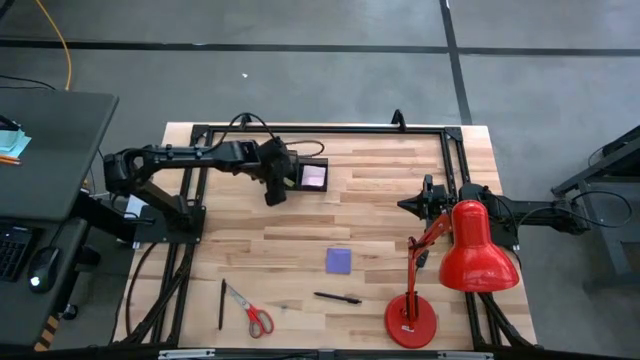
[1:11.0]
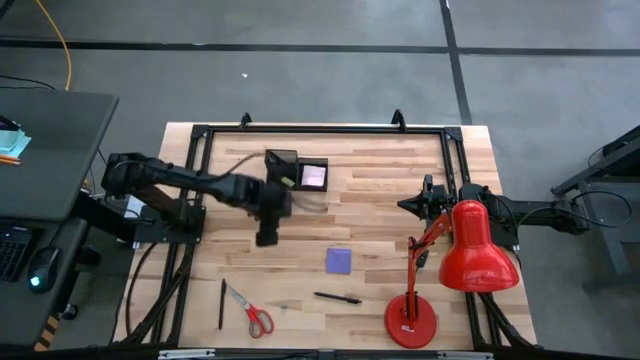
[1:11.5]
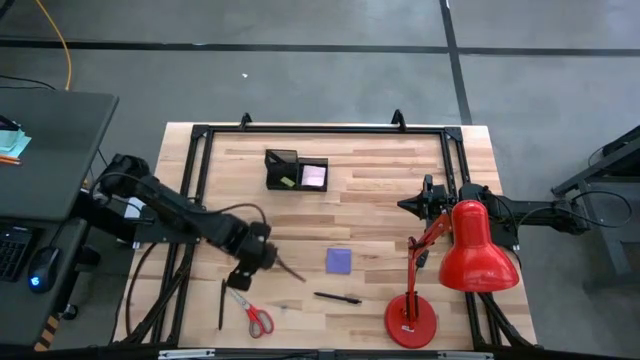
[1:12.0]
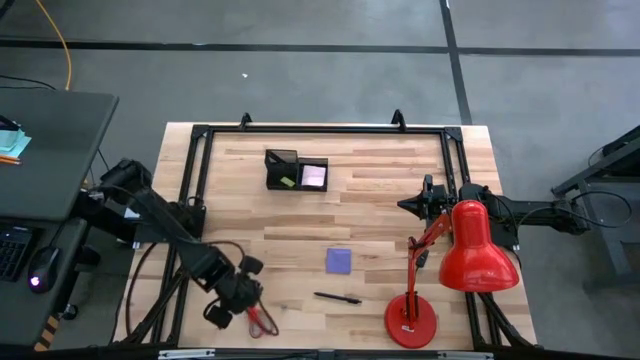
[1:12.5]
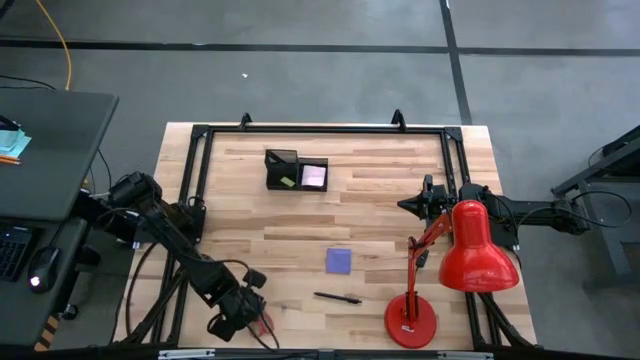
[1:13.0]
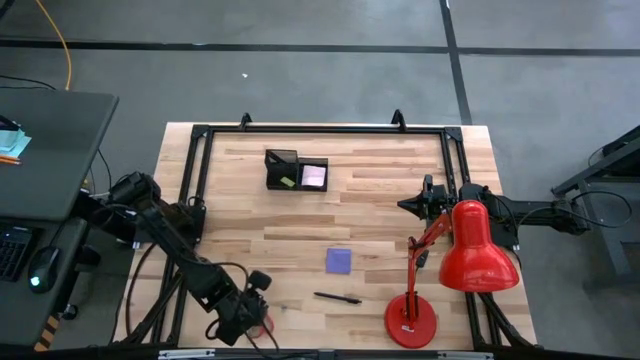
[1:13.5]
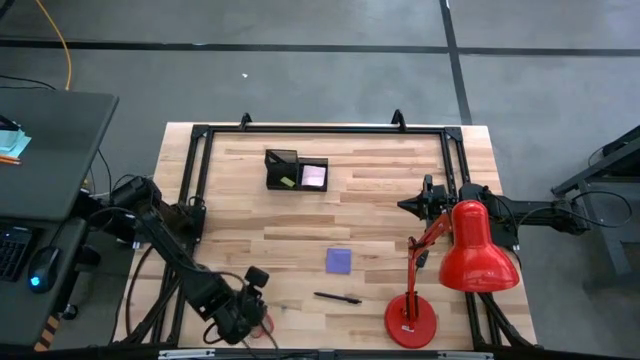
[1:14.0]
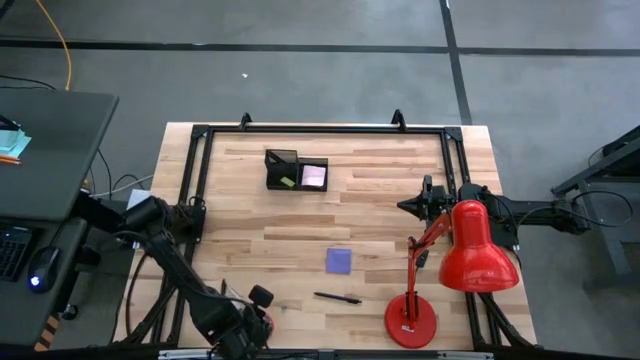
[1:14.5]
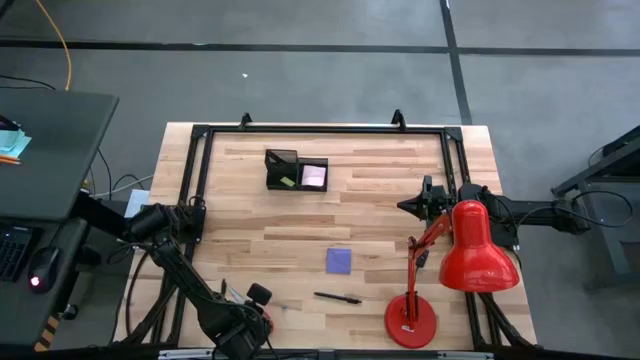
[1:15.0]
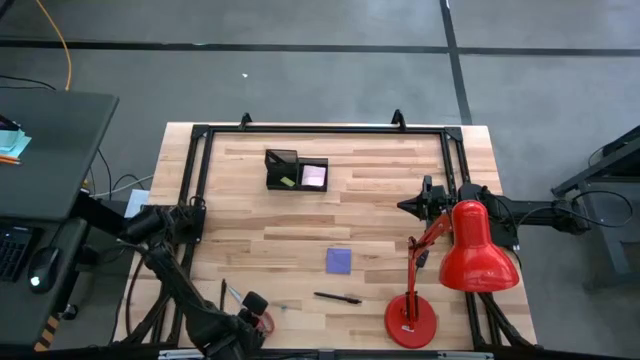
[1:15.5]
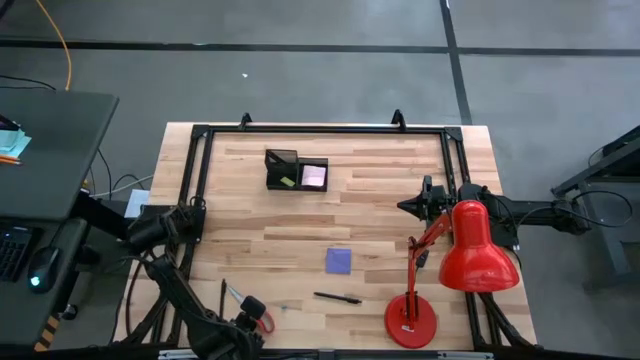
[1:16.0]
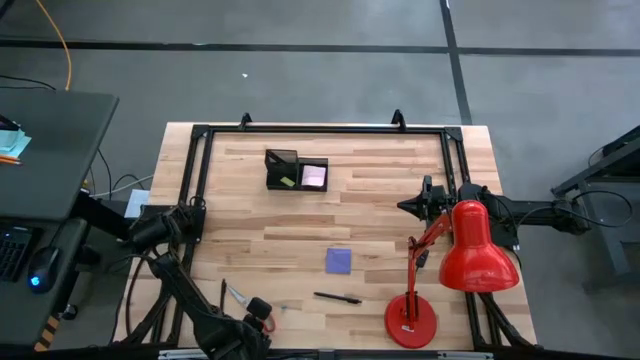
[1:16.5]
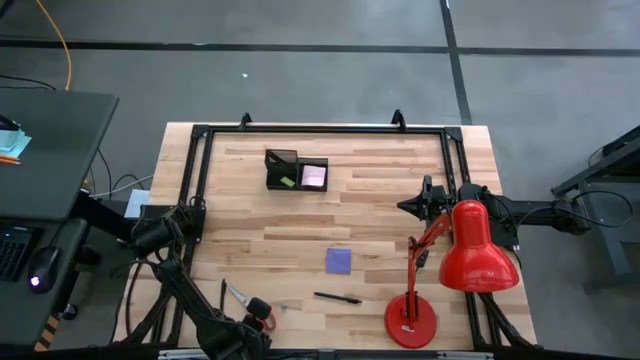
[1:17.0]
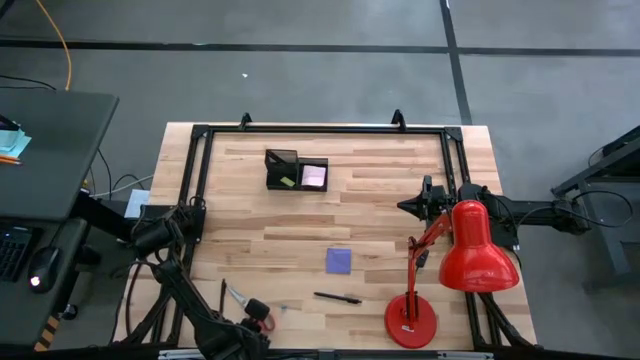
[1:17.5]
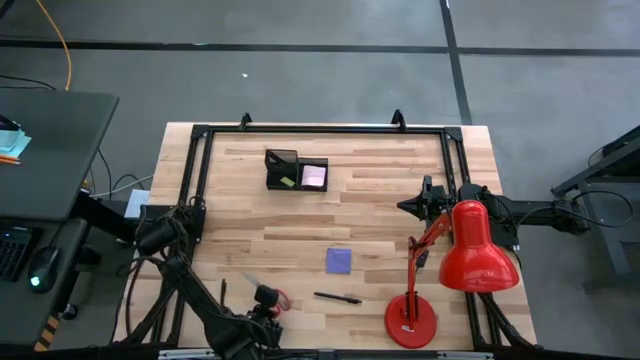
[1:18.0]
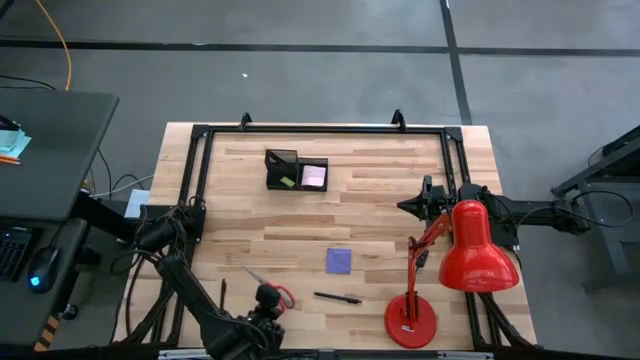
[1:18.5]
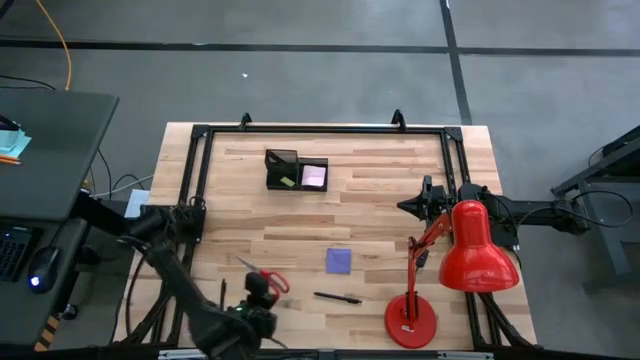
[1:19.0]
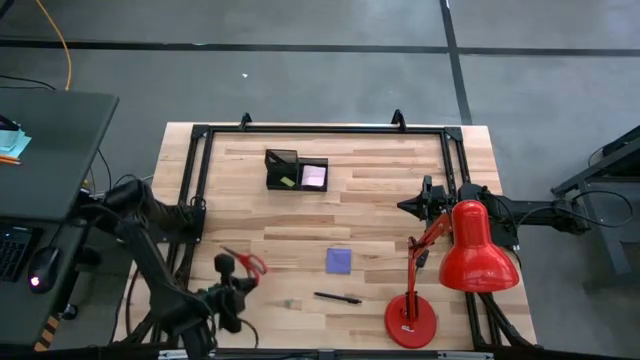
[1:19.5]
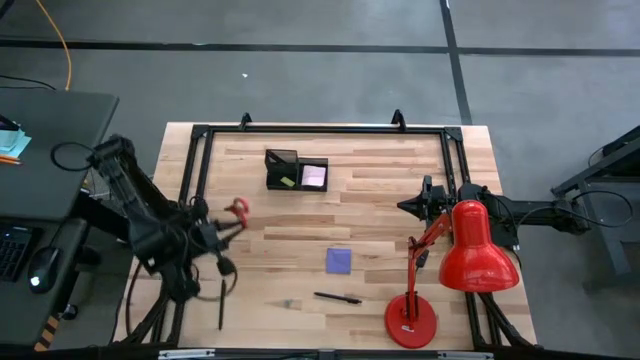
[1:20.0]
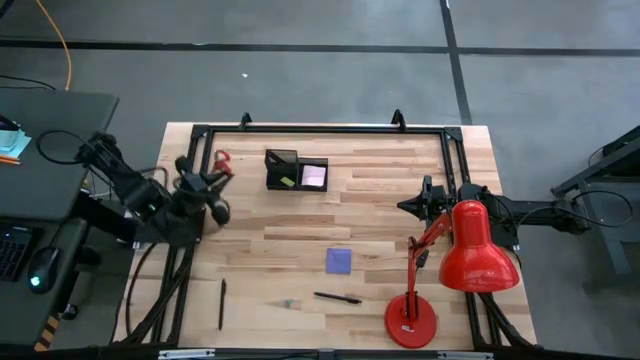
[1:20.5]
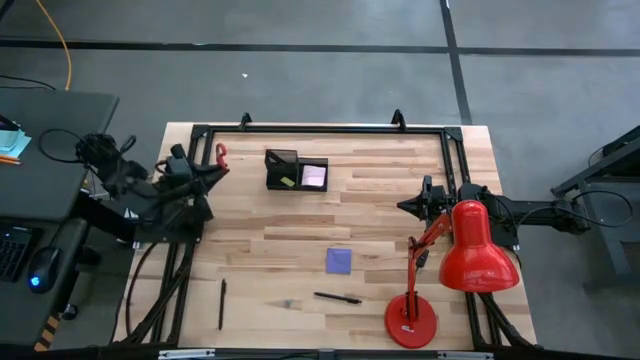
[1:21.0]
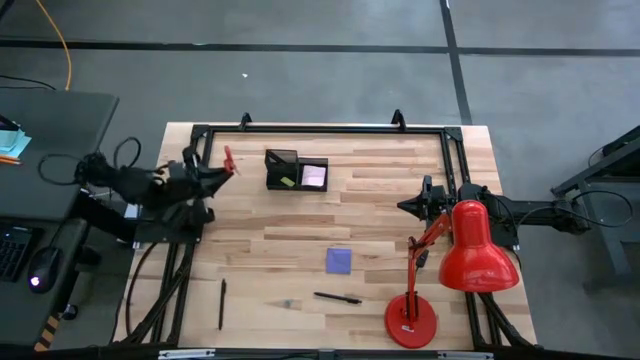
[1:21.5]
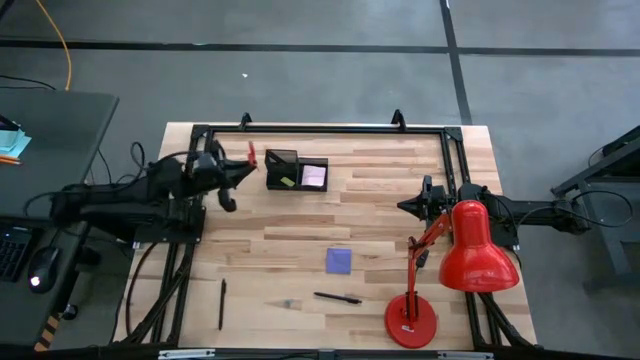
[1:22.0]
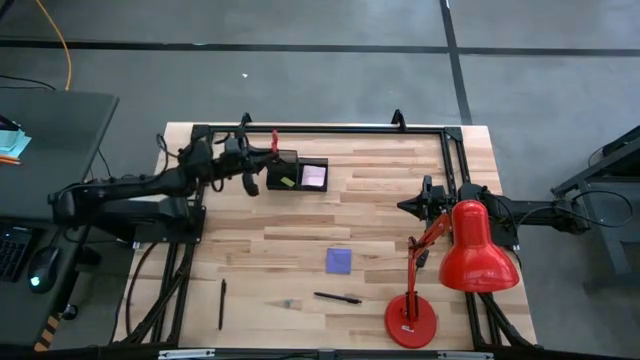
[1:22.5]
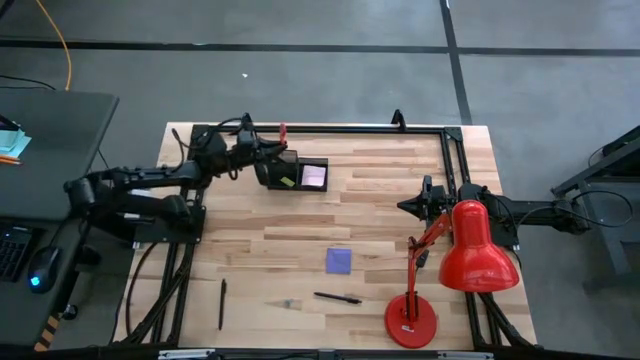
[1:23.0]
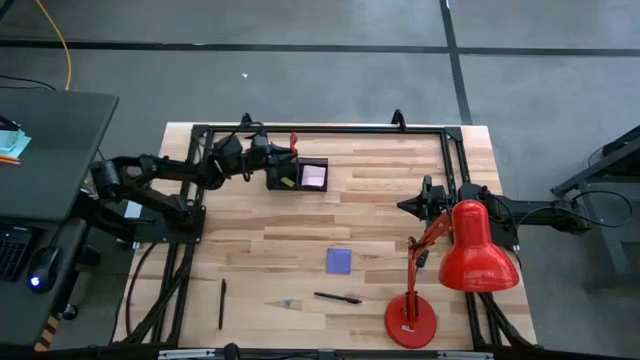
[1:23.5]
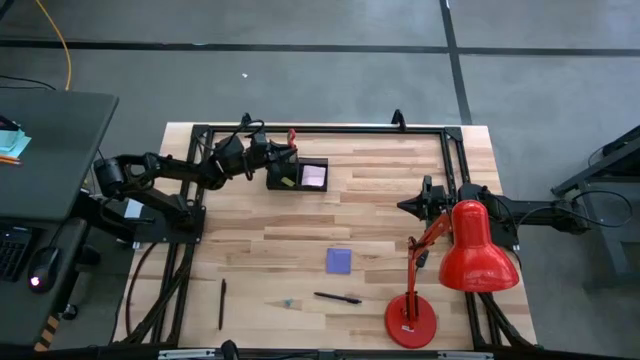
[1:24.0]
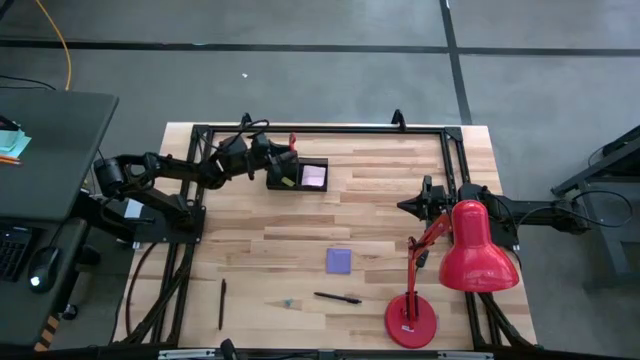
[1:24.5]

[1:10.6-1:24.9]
Task: Pick and place office supplies into organizer
Put the red scissors into the black desk organizer

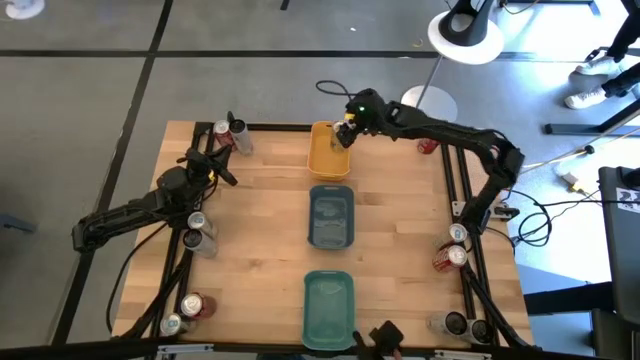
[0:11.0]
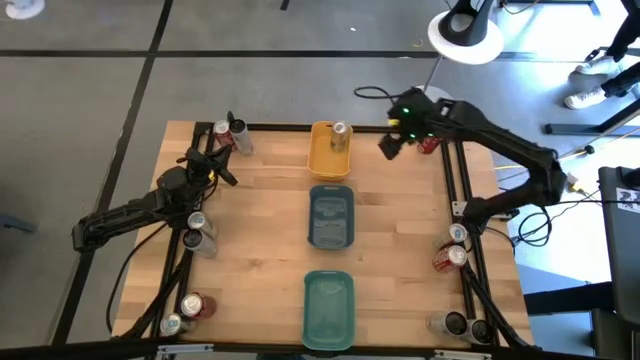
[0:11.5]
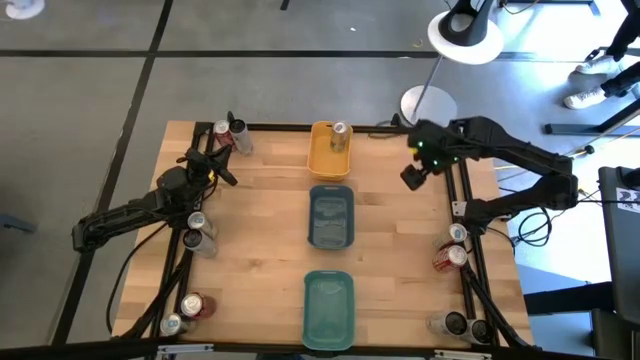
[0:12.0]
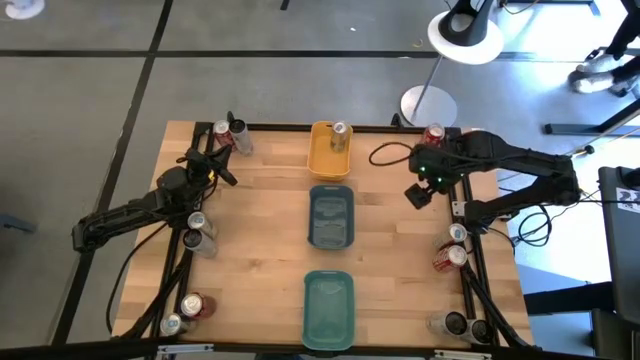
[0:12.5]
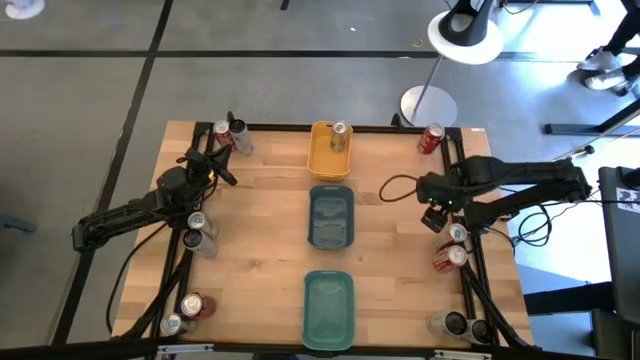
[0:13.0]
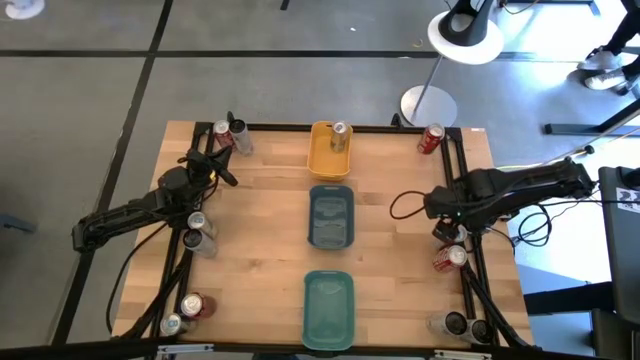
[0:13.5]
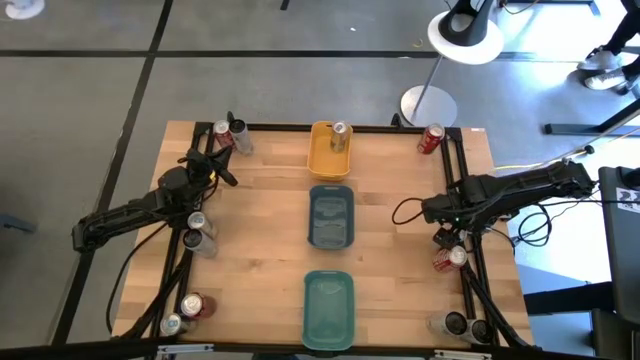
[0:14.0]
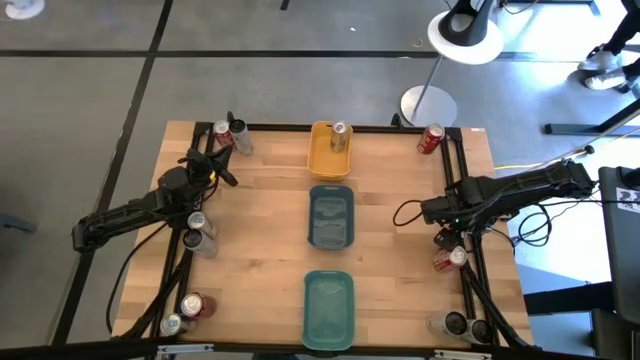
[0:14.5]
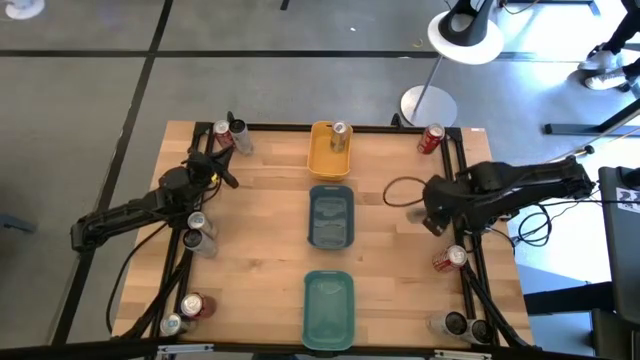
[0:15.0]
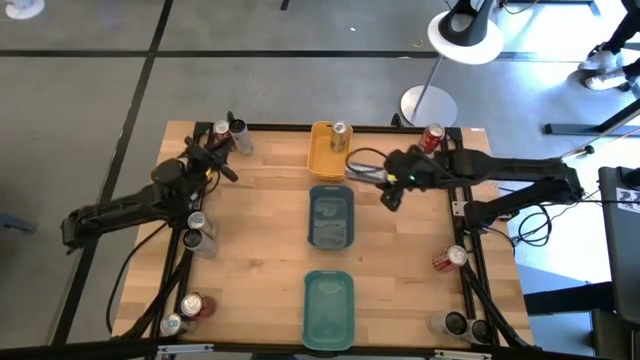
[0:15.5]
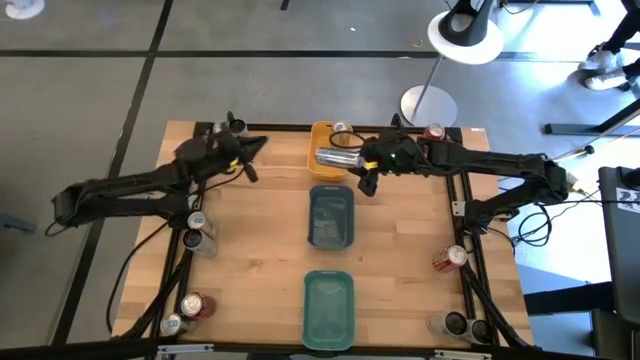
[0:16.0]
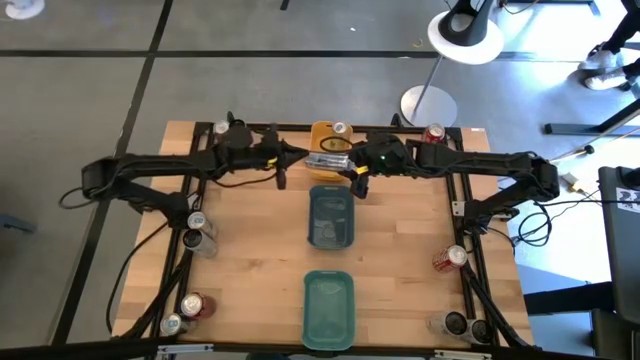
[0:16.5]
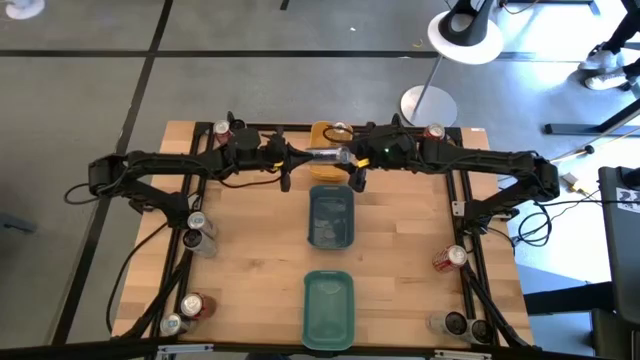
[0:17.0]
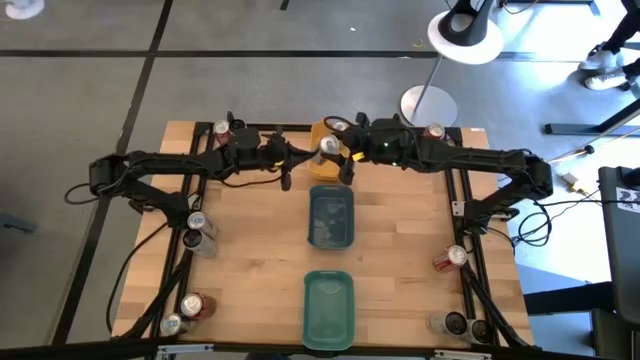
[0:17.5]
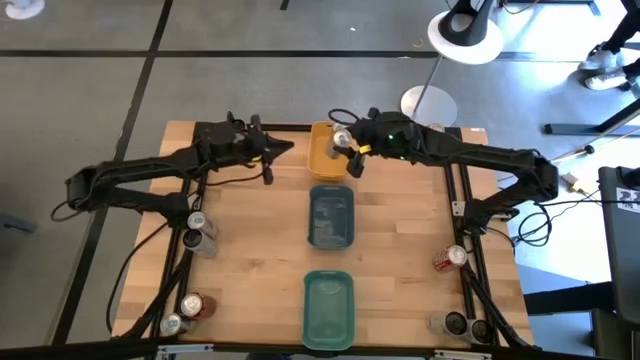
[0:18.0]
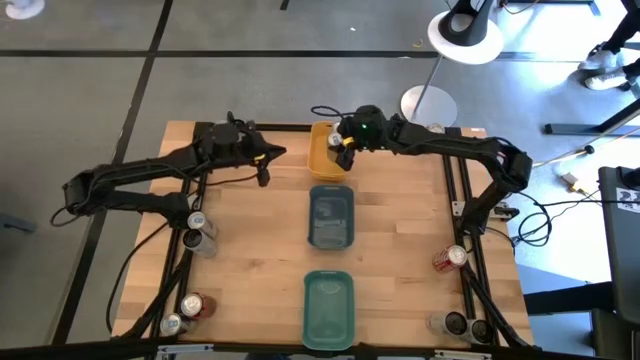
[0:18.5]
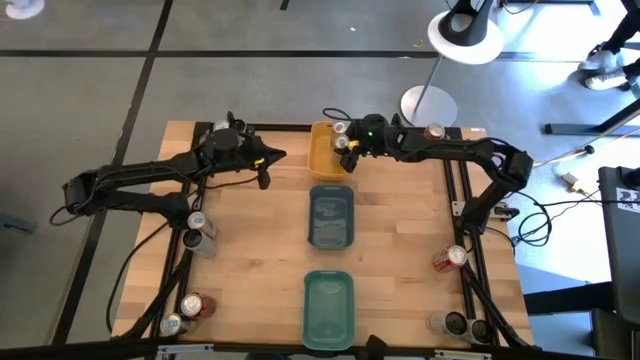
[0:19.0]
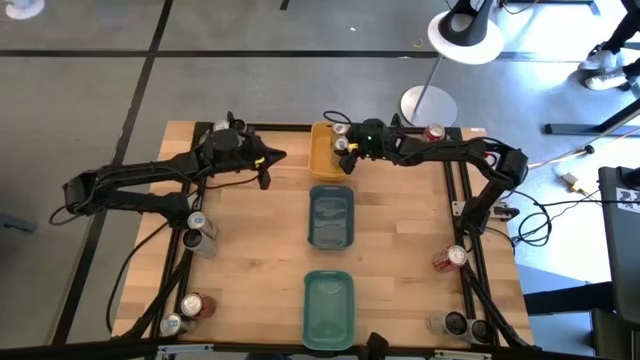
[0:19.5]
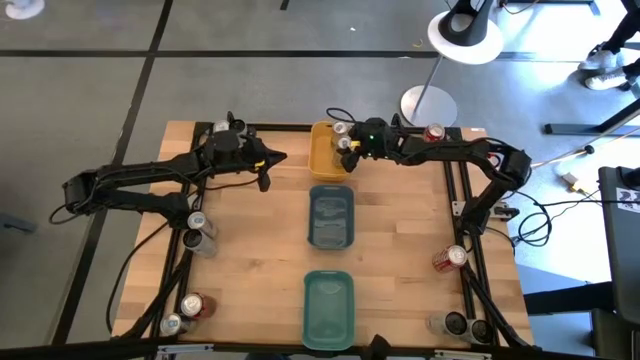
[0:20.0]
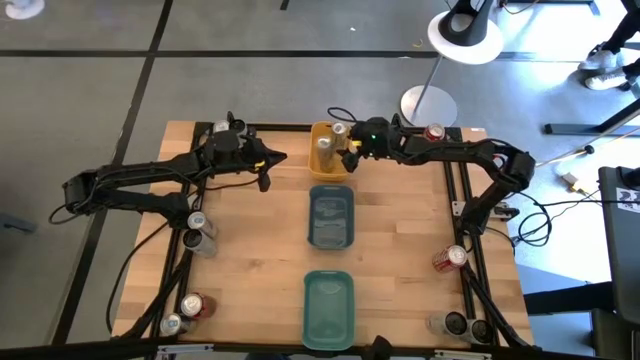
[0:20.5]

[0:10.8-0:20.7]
Task: Sort soda cans
Put the top right blue soda can into the yellow bin
